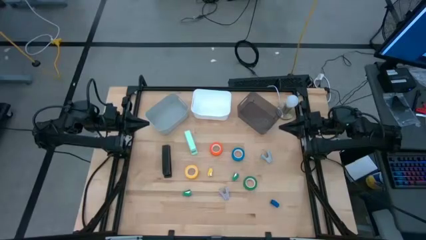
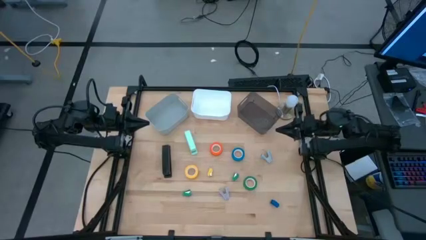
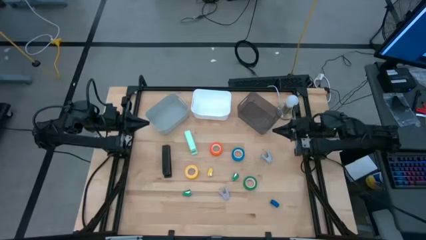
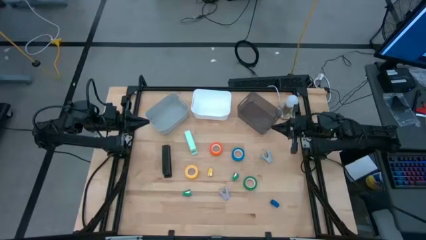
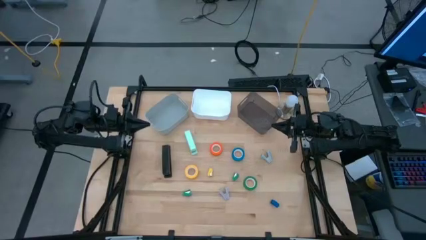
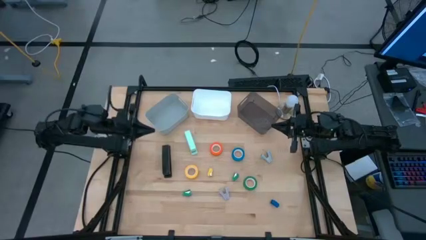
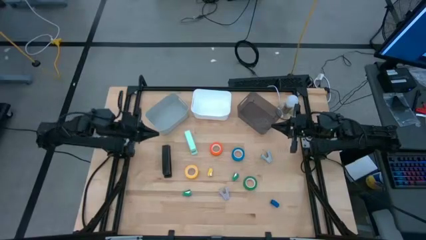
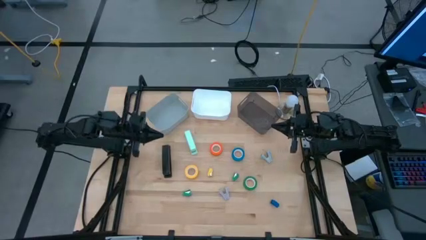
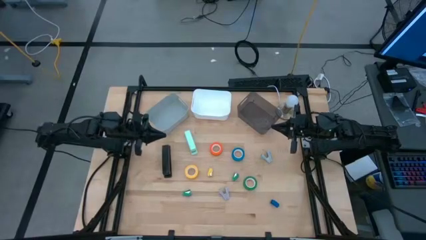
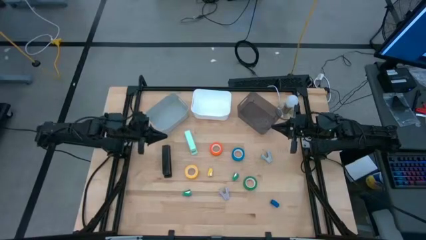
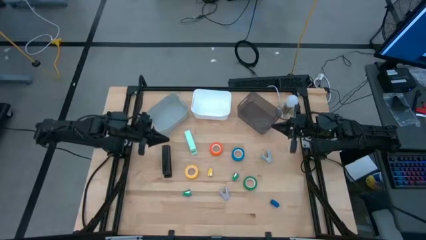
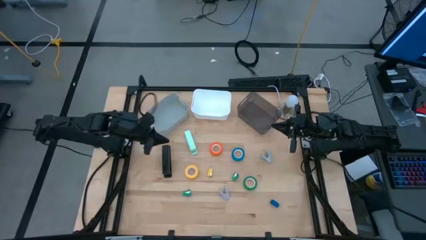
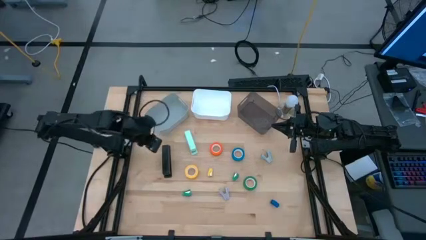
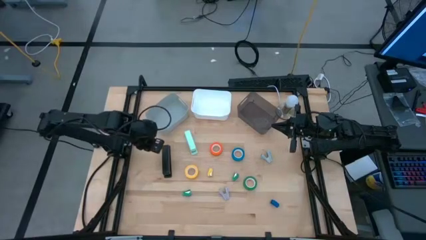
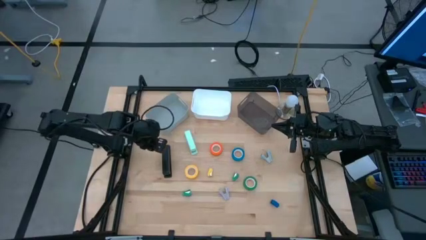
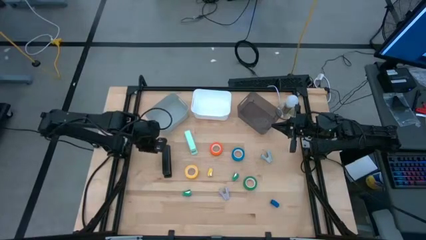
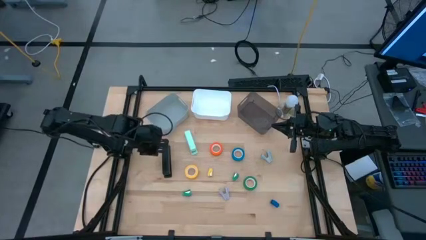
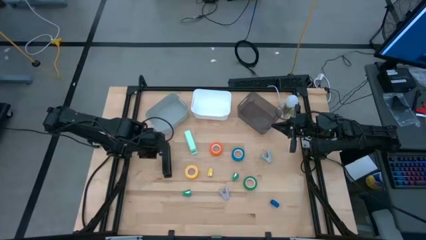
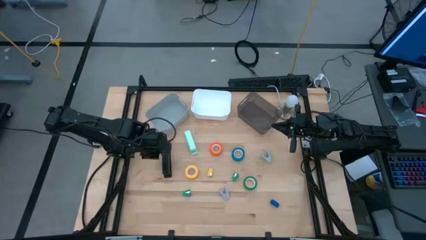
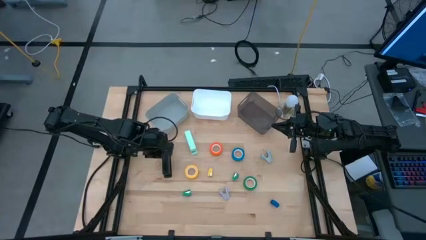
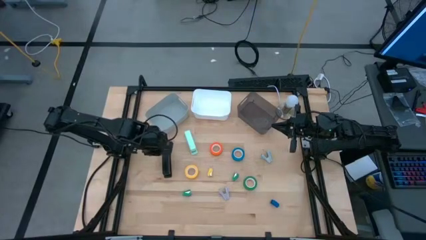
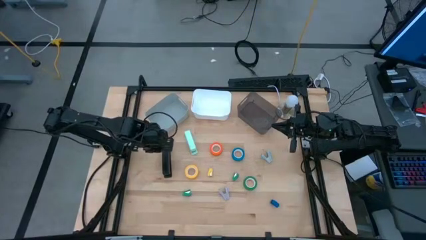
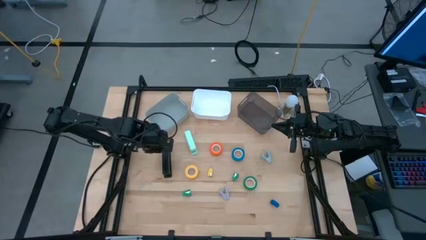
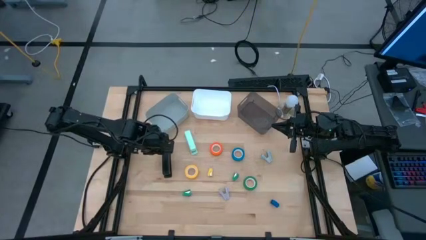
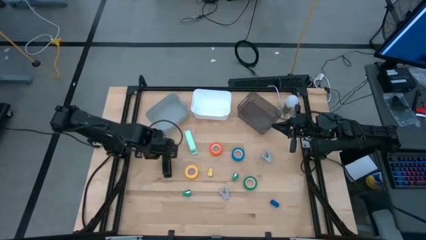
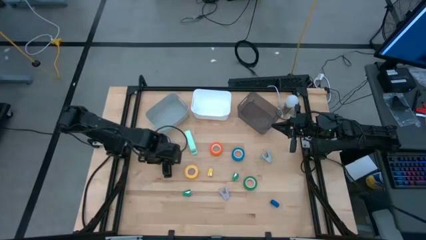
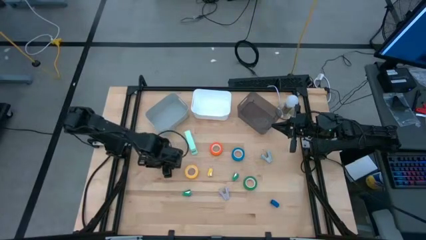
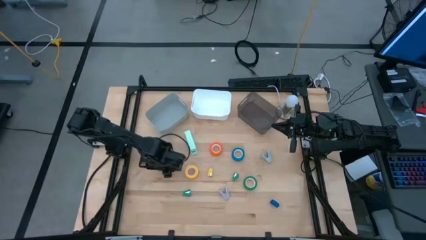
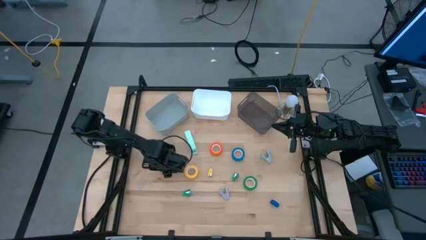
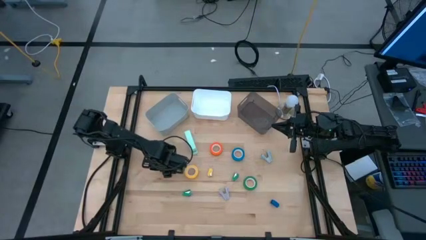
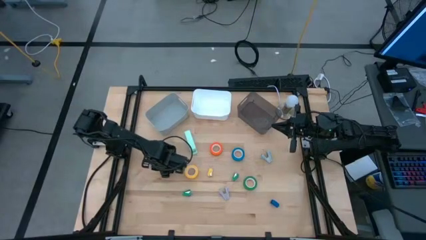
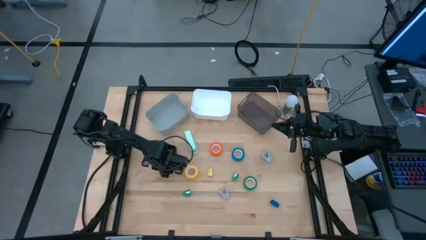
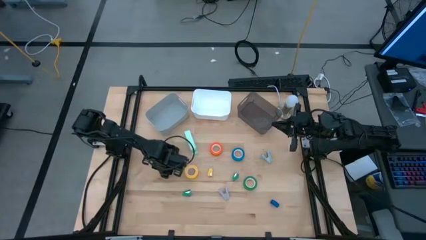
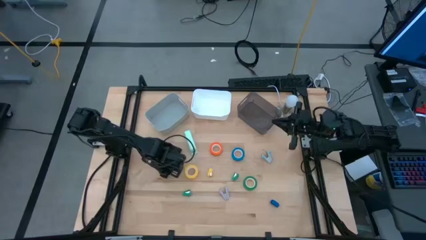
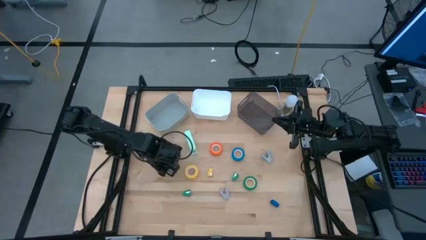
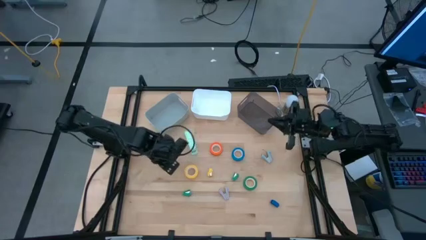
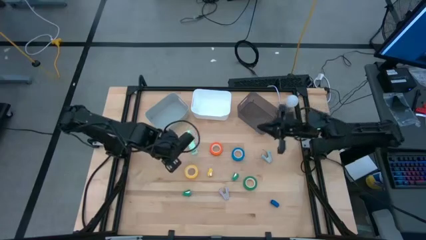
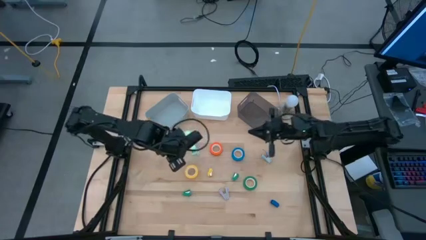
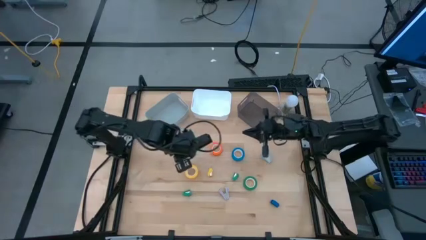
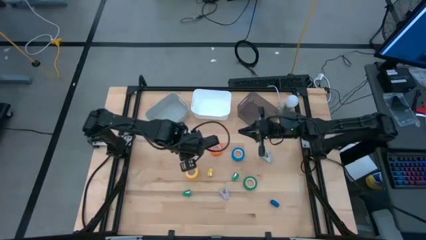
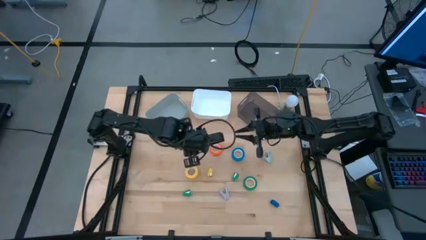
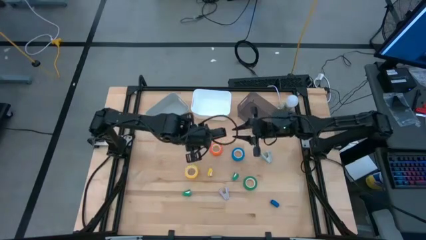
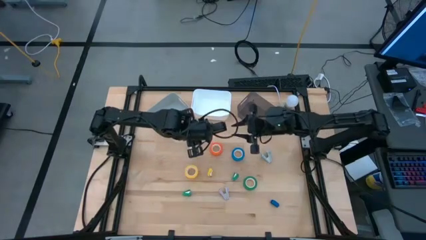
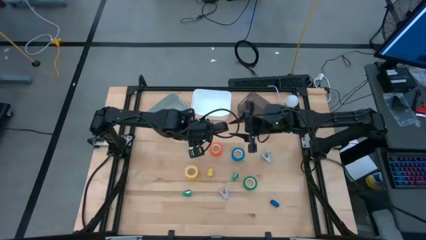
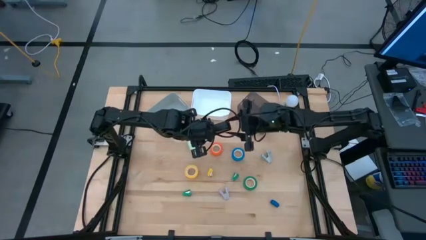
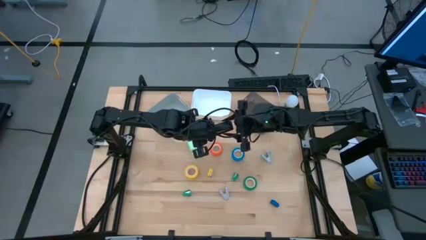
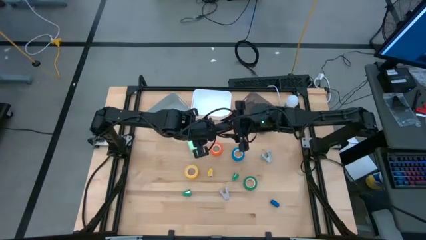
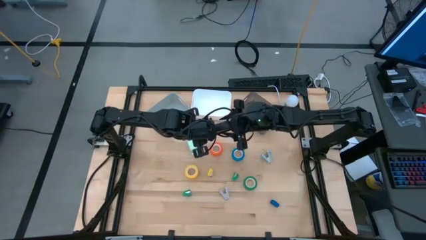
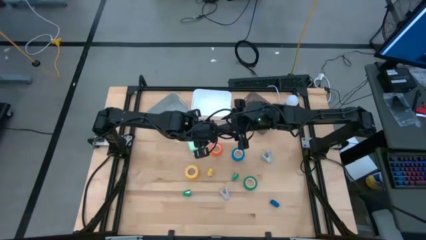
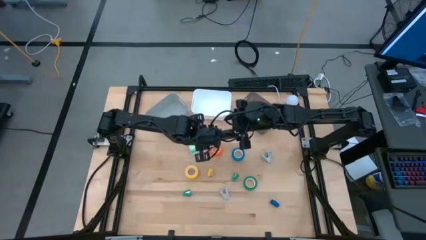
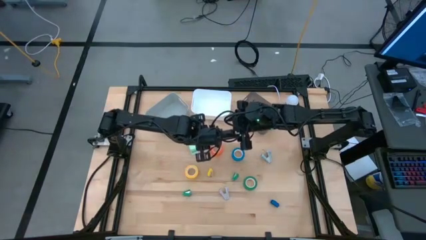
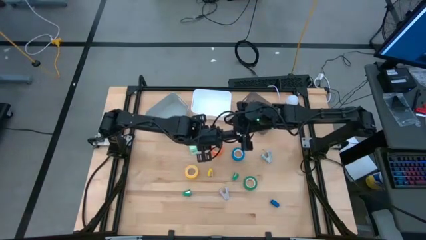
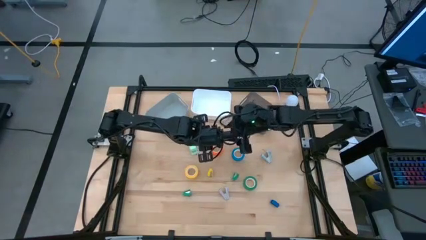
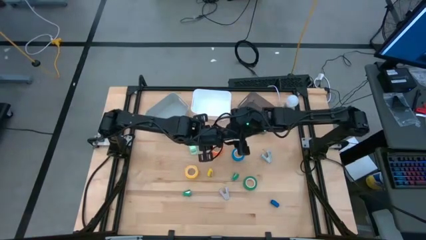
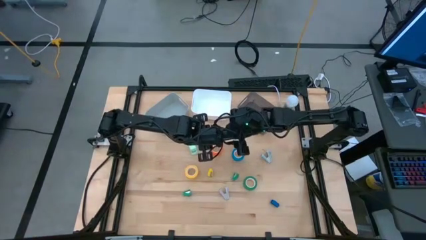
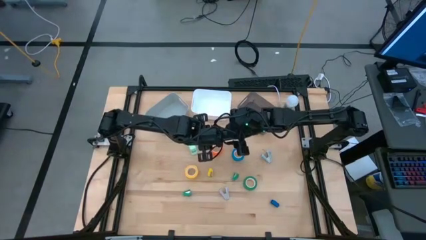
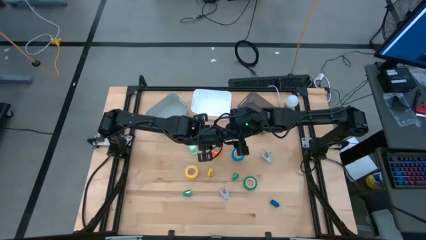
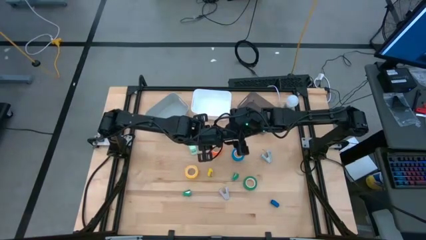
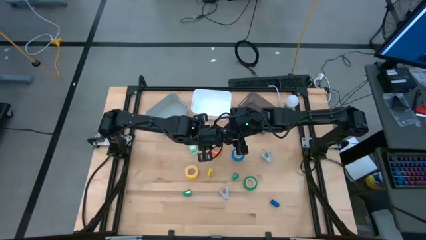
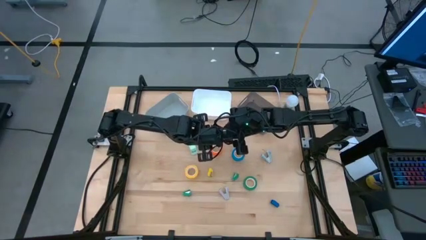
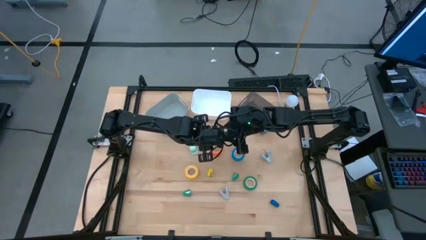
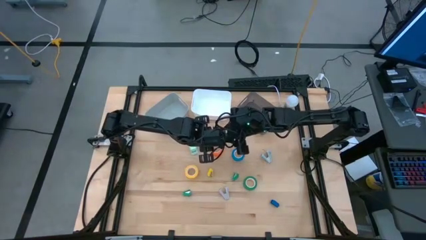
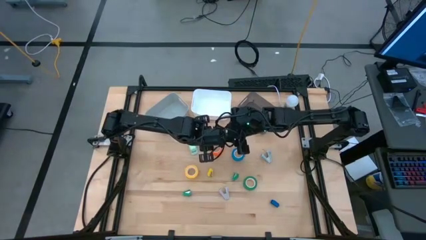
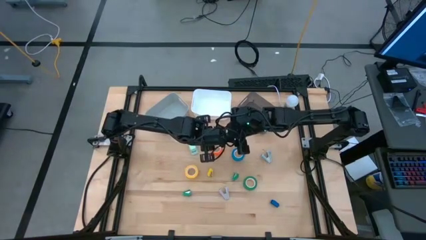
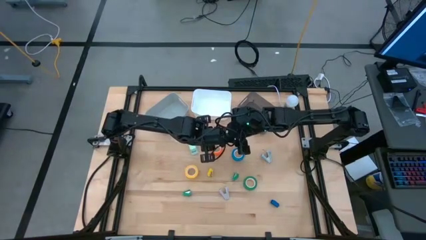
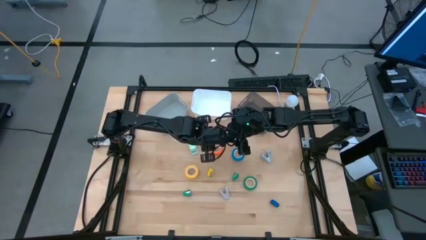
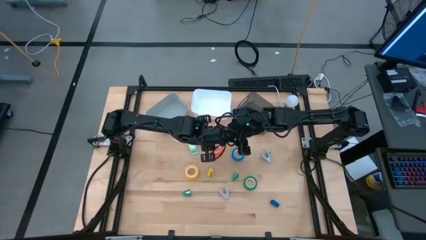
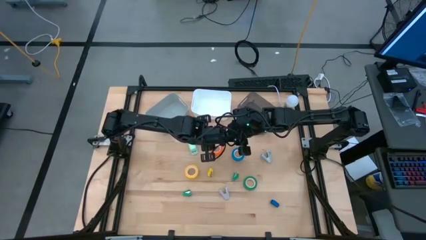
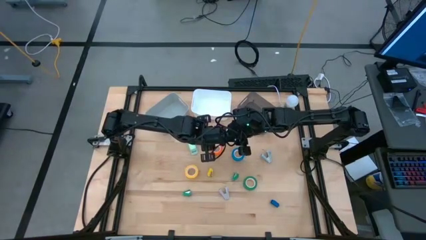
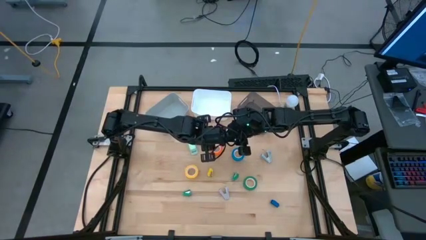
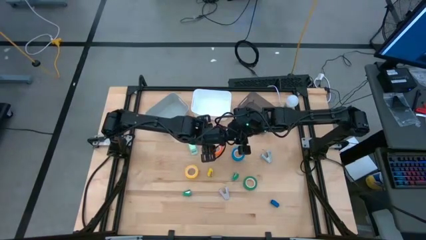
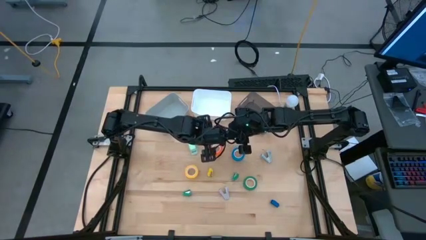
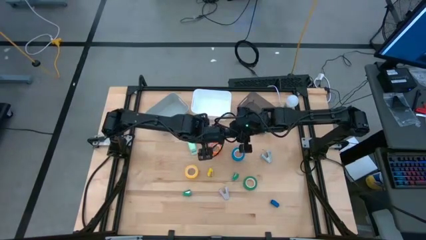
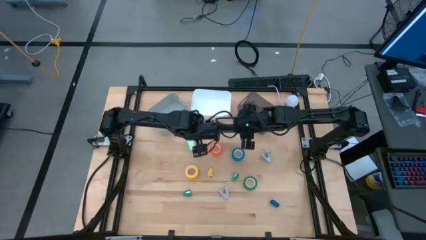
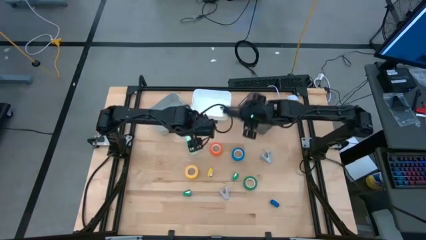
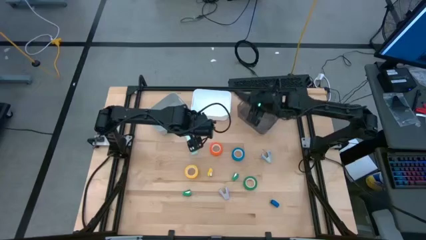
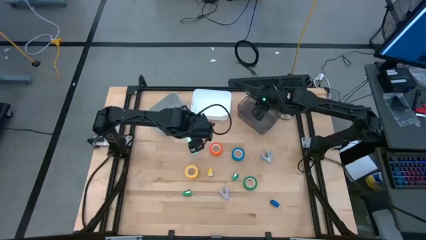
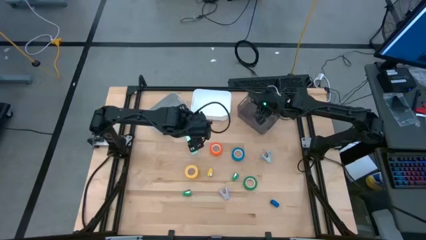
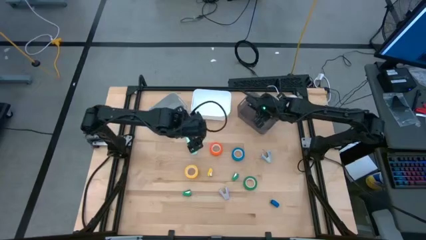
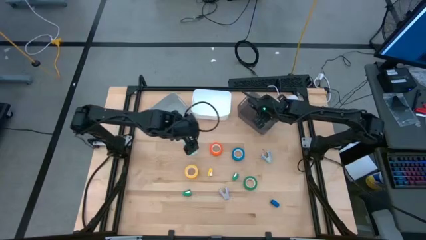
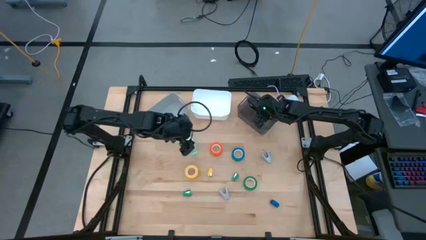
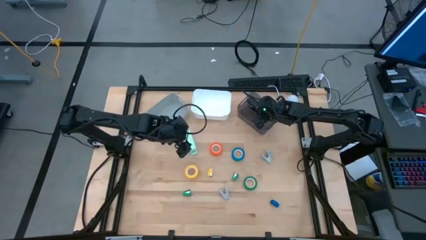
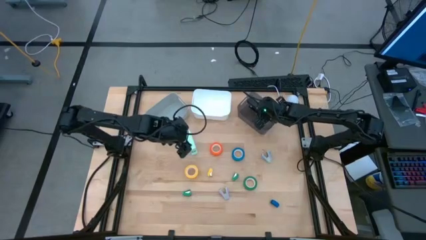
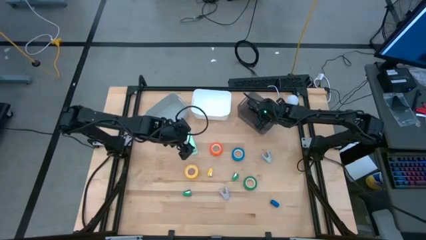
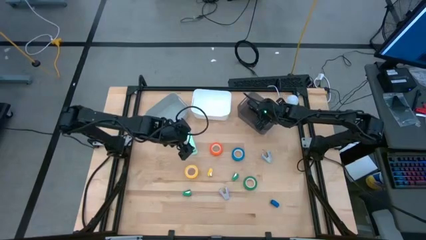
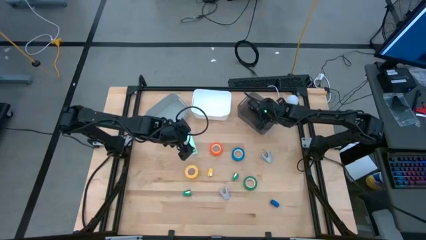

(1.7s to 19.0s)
Task: Pick and place Stapler, Stapler remover, tape
Put the large black stapler into the black bin
